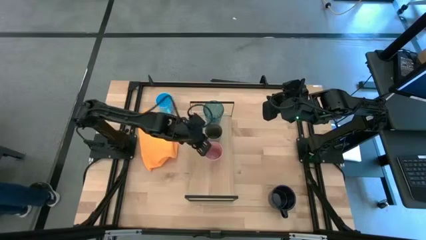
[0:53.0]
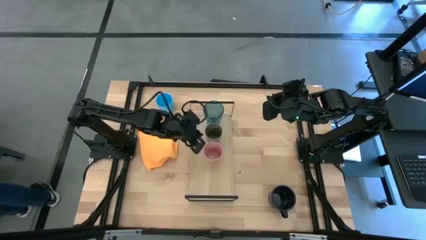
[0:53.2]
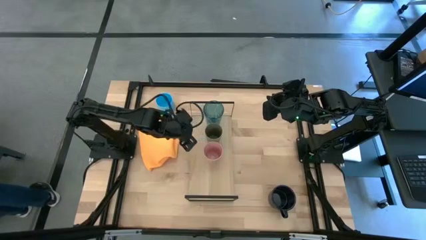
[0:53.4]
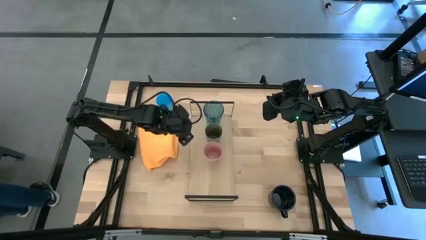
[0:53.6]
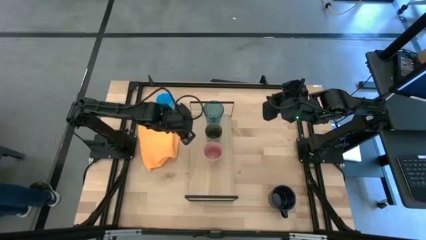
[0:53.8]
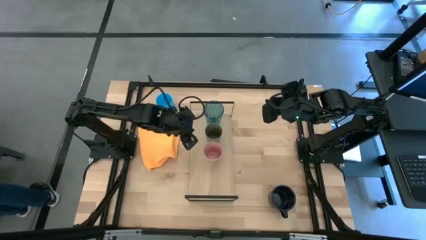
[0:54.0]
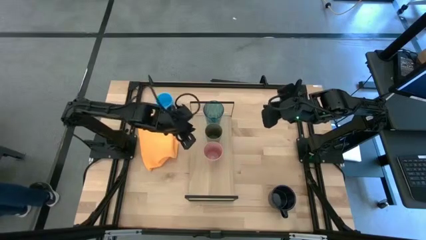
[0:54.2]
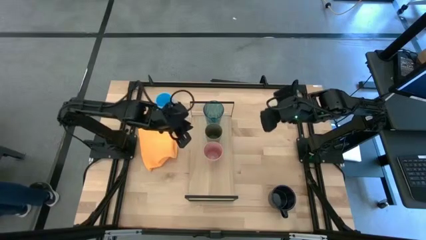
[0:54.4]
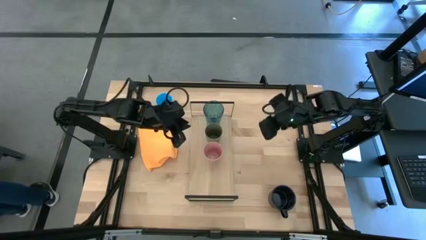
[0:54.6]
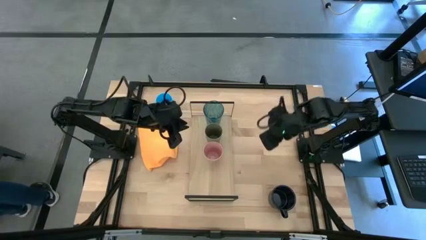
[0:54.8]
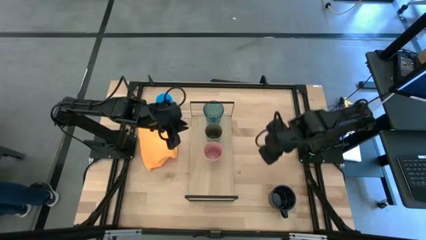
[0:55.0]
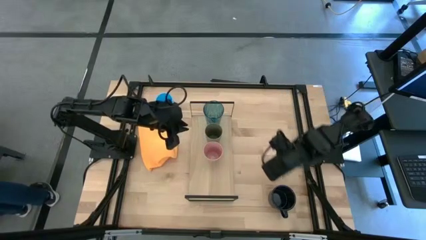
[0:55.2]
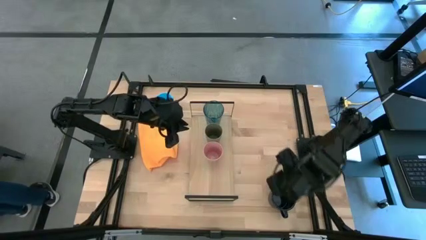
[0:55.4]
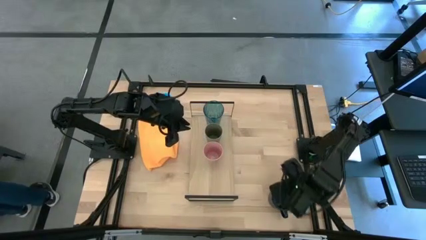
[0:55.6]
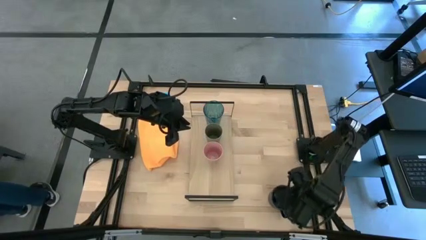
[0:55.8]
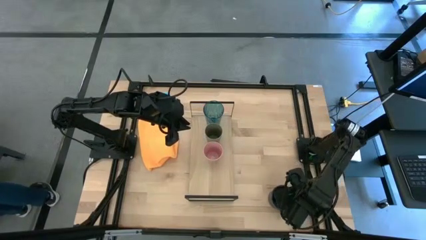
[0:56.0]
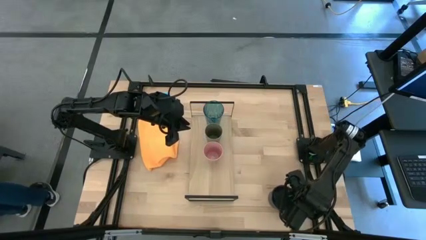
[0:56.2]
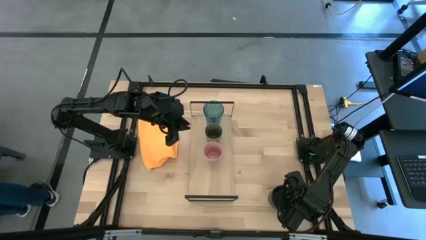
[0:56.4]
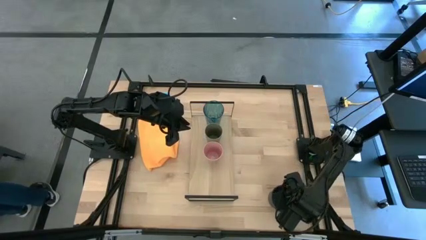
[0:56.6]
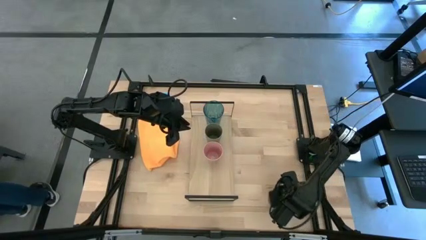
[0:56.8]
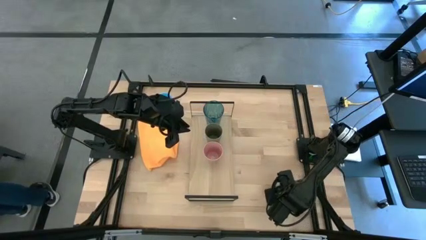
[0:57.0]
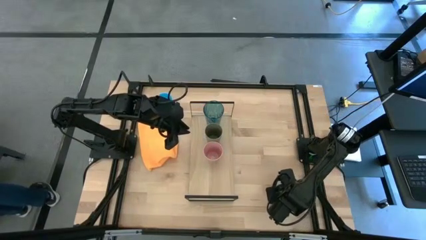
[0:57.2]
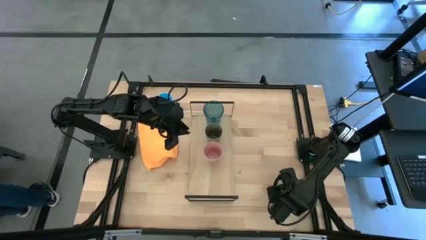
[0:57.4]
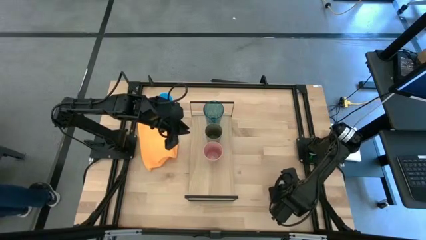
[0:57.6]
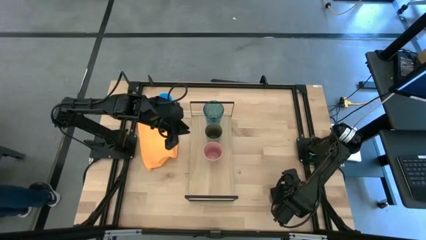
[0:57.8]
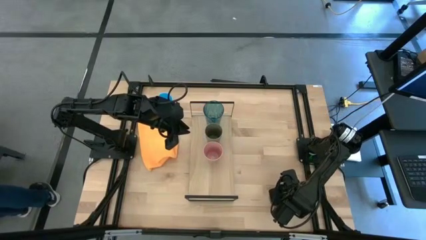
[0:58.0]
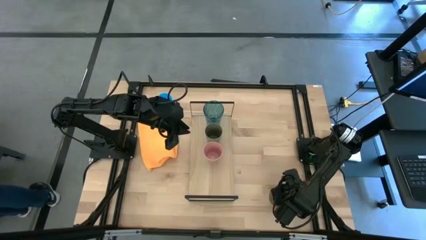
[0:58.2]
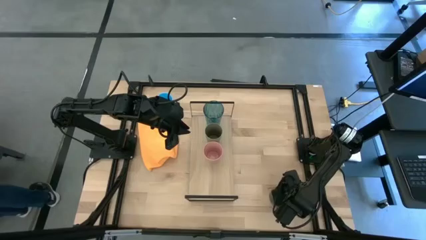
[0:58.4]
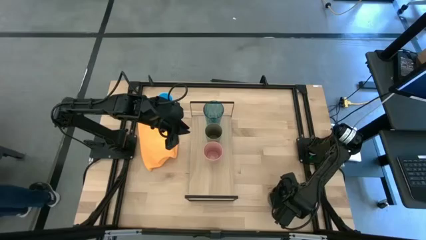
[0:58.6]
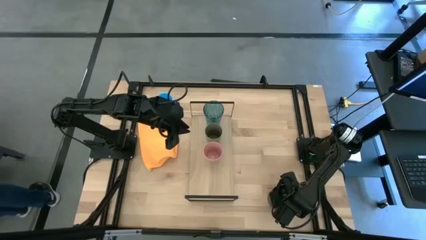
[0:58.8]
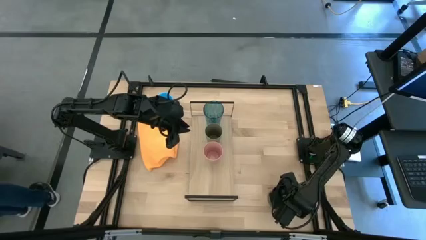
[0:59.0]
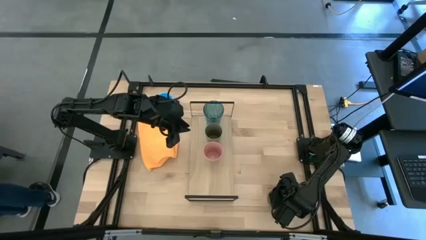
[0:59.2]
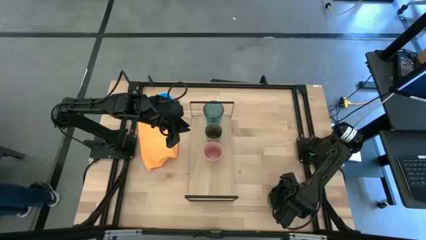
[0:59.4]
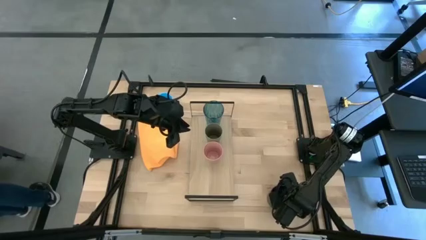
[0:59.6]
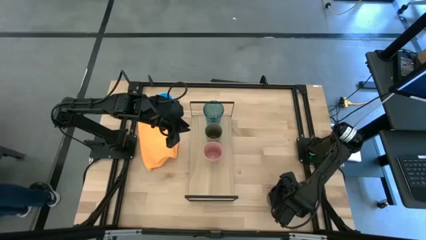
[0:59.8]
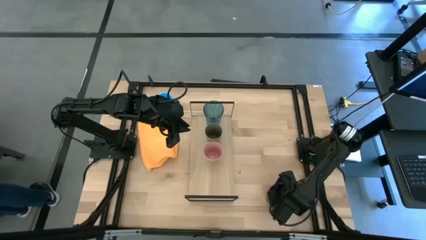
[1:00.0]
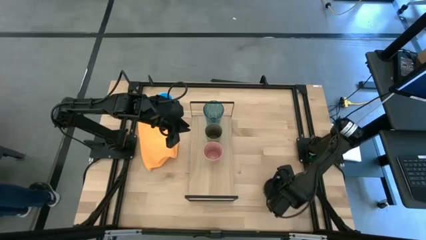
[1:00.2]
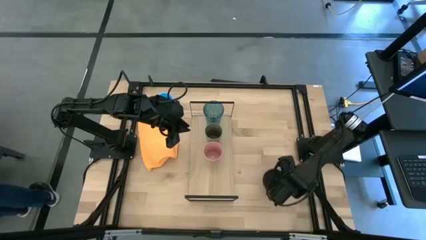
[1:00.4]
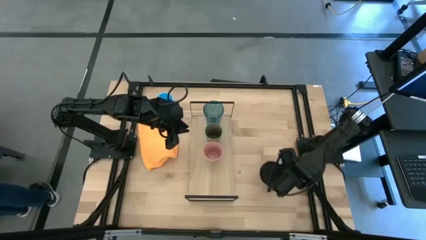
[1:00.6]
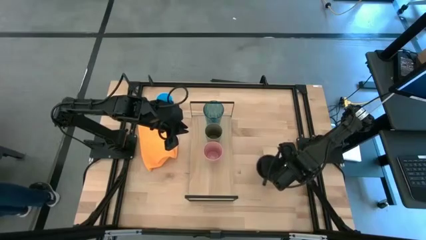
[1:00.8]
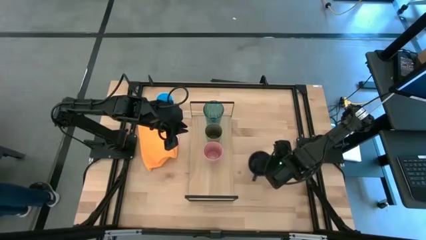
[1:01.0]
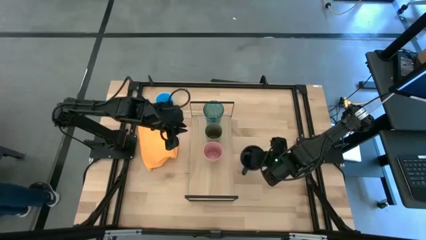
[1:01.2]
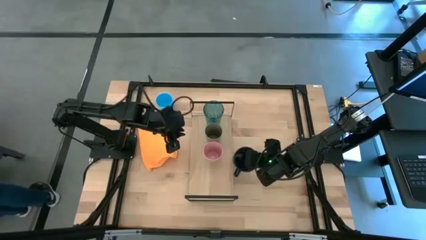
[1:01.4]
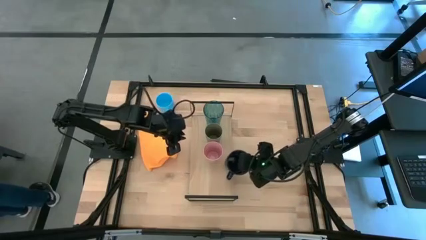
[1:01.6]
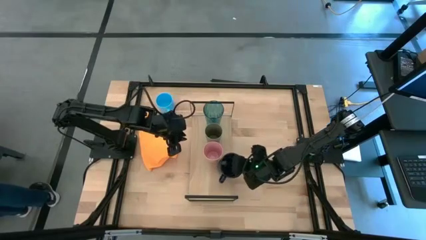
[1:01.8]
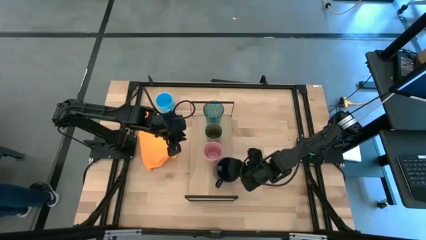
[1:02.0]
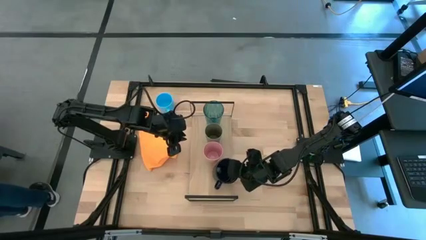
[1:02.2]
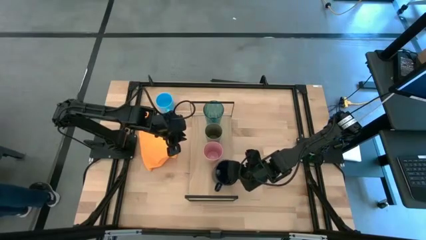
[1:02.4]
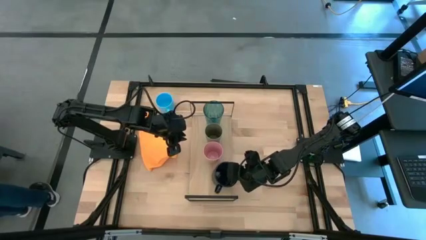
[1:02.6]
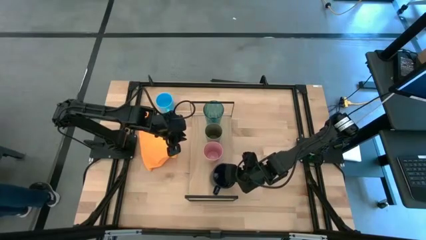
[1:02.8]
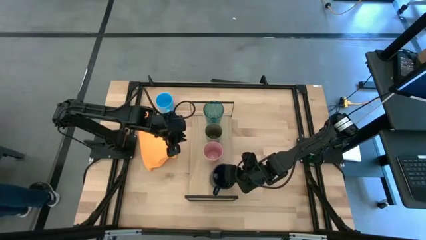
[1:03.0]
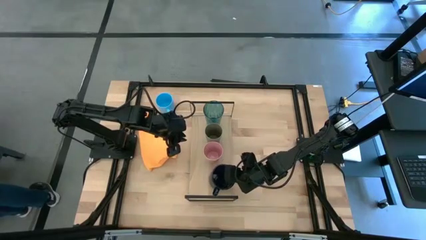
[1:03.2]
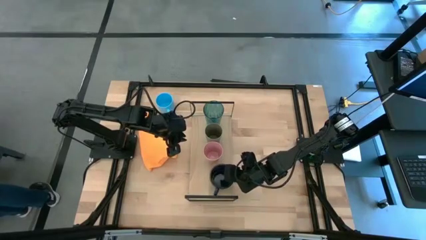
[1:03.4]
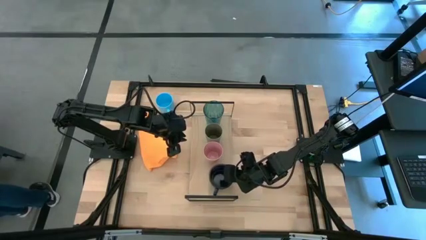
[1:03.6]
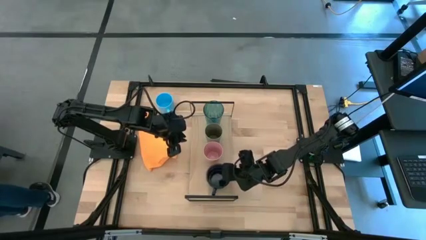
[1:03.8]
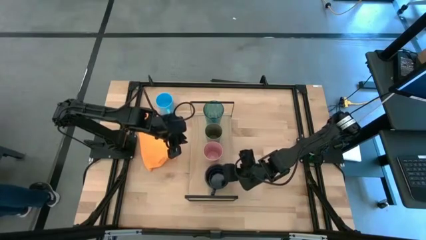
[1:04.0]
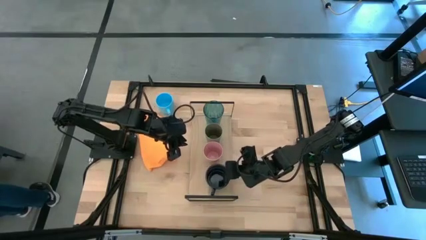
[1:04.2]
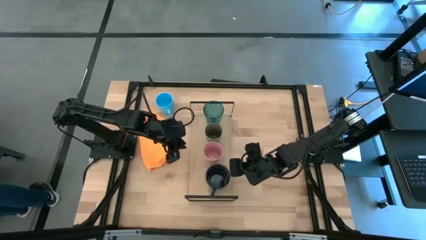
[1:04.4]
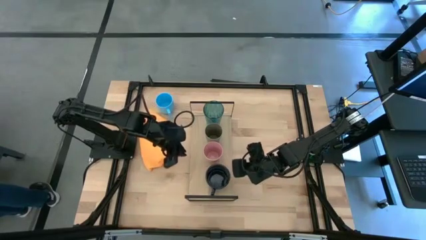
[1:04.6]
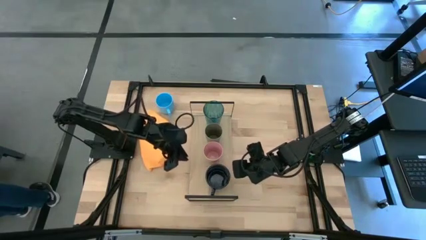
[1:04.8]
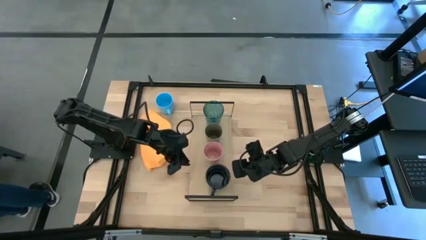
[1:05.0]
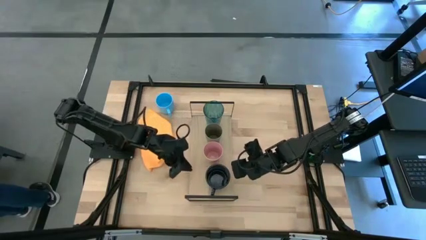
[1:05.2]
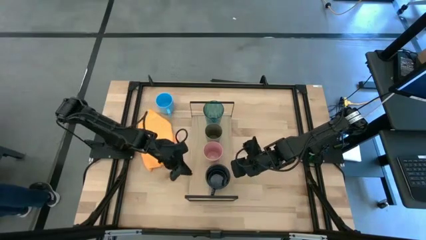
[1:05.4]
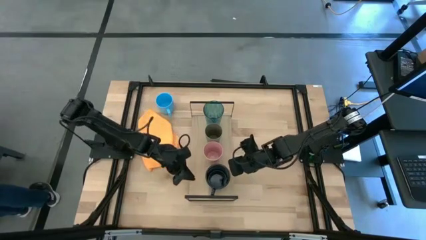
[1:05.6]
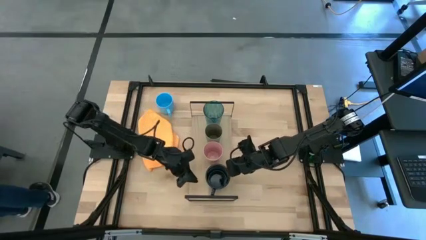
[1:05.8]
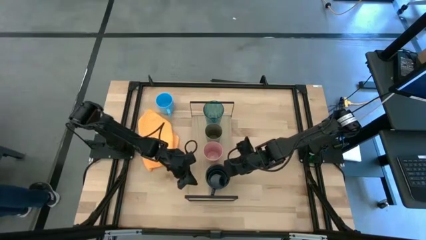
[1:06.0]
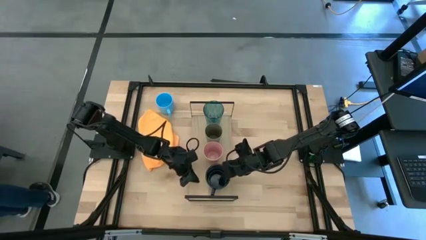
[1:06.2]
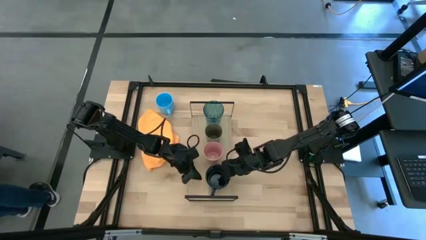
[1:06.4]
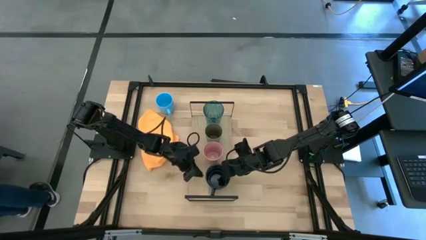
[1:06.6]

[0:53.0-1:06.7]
Task: Stack small to large cups/mugs on shelf
Put the dark blue mug on the shelf

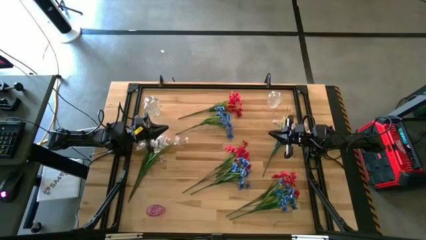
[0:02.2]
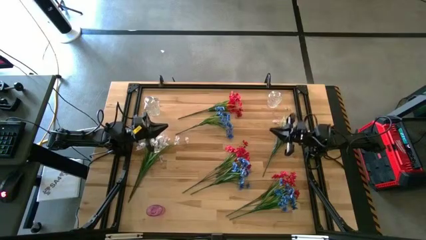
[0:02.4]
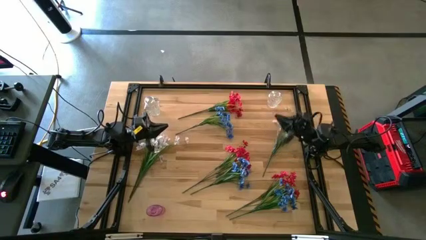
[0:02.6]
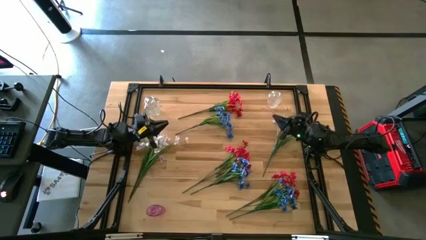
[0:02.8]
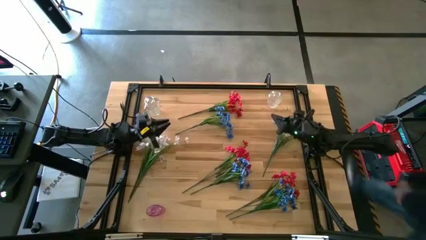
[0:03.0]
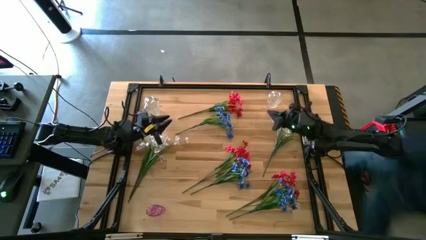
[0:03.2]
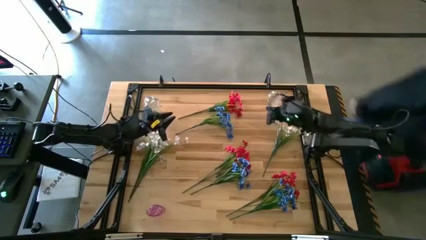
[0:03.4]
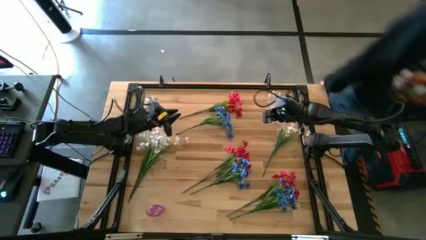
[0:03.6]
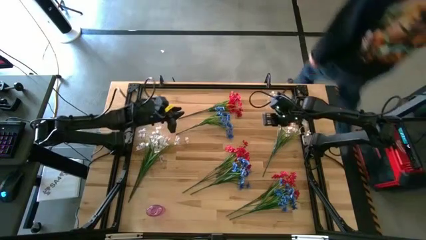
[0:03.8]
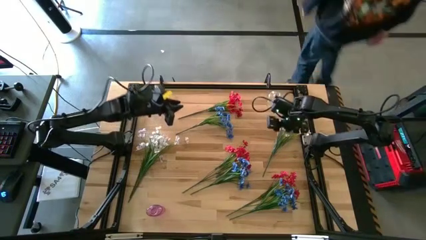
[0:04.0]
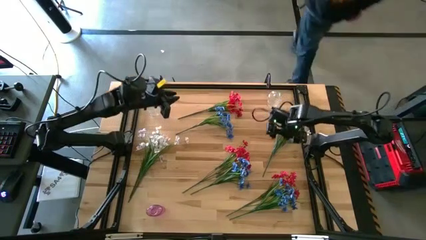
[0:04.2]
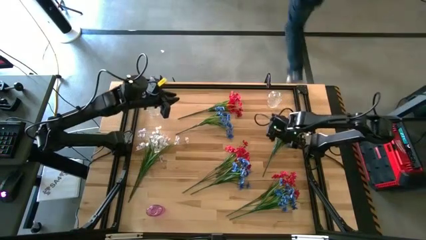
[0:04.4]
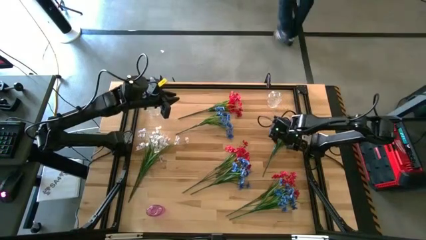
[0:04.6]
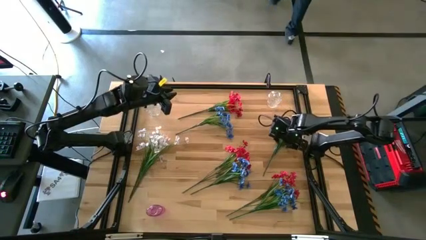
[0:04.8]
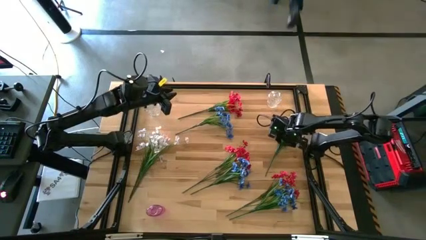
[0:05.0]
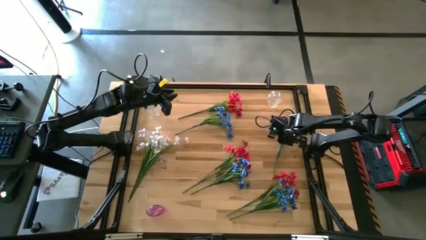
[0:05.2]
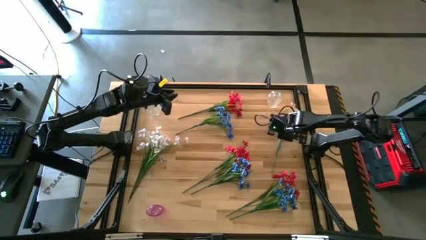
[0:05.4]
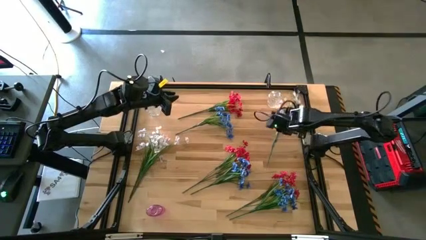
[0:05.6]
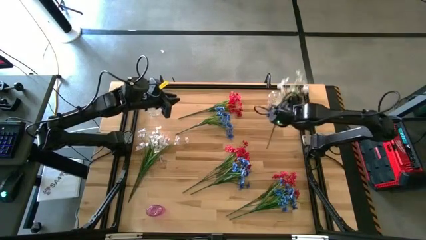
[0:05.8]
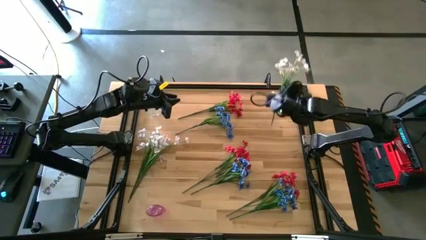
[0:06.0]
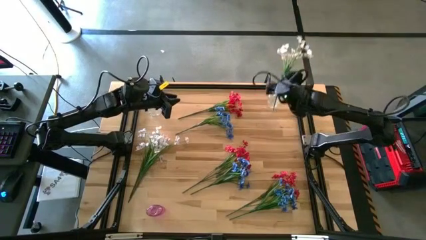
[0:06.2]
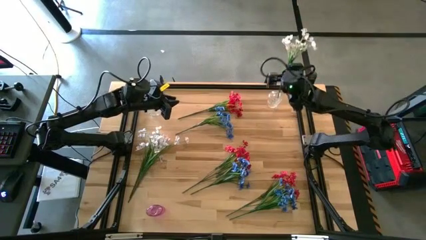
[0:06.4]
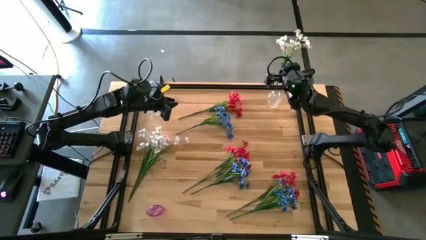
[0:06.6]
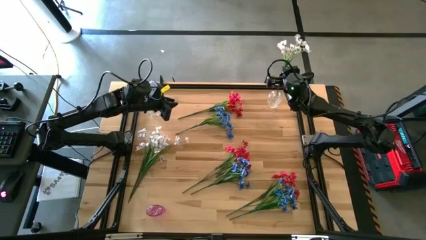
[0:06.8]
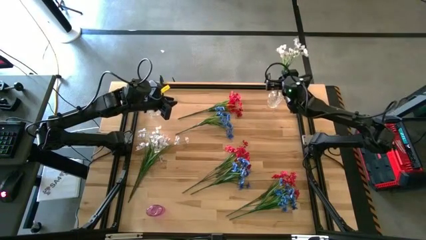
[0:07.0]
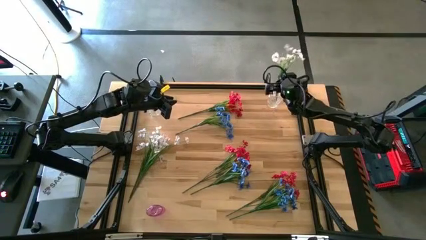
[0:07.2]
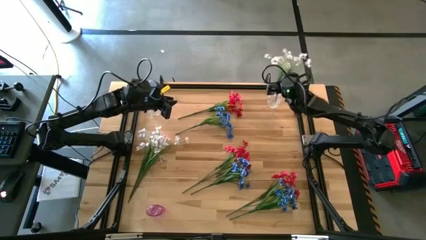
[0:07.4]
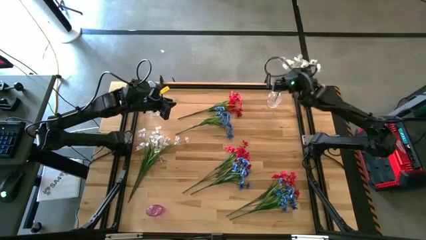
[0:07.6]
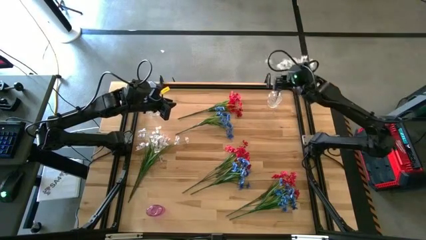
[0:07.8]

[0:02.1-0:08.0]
Task: Sort flowers into vase by color
Put the right white flowers into the right transparent vase
